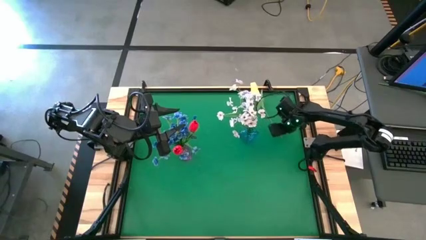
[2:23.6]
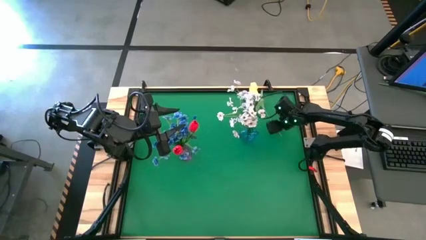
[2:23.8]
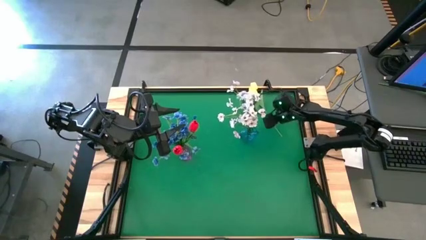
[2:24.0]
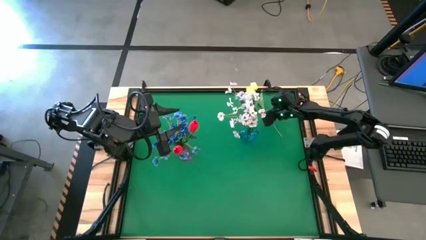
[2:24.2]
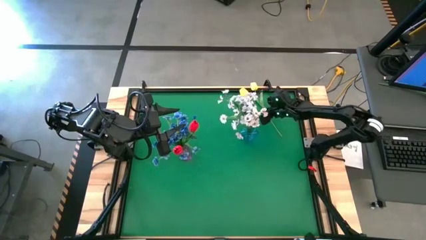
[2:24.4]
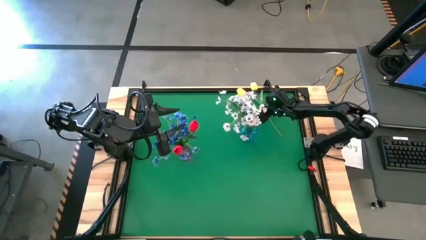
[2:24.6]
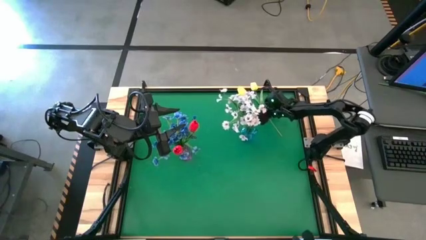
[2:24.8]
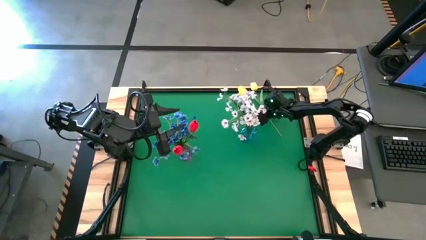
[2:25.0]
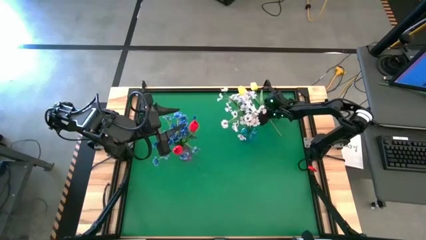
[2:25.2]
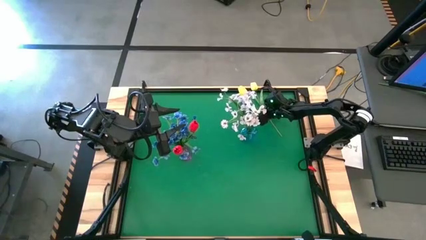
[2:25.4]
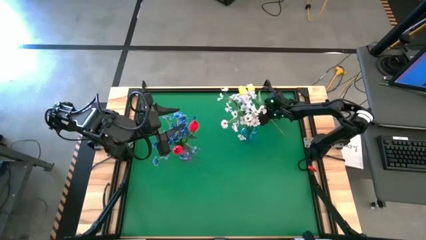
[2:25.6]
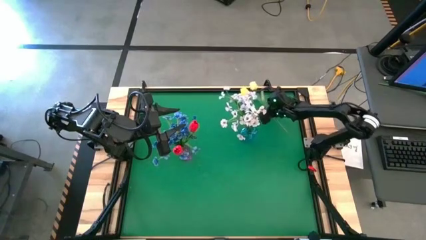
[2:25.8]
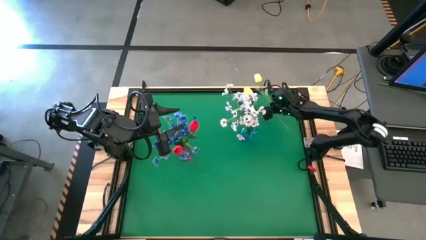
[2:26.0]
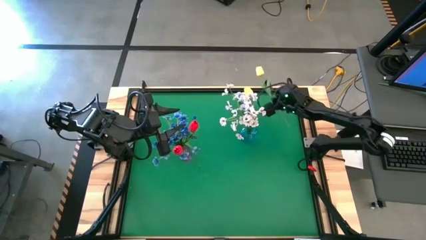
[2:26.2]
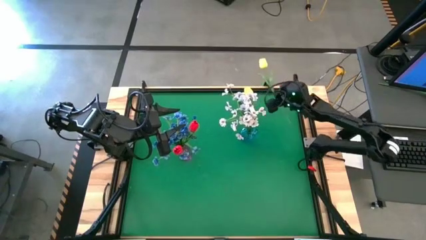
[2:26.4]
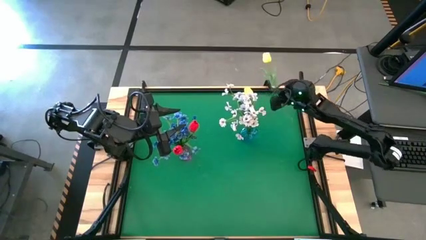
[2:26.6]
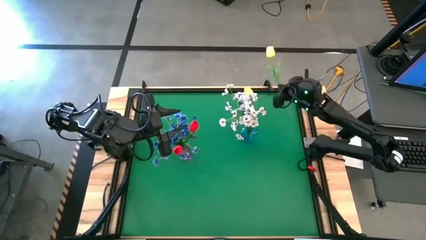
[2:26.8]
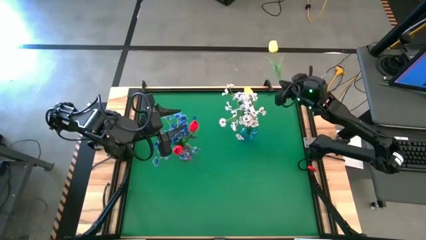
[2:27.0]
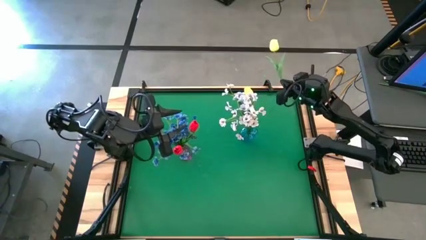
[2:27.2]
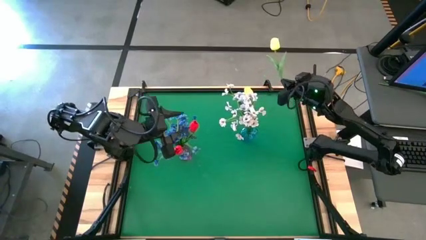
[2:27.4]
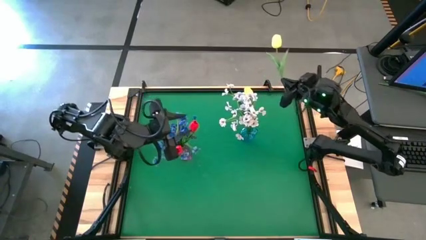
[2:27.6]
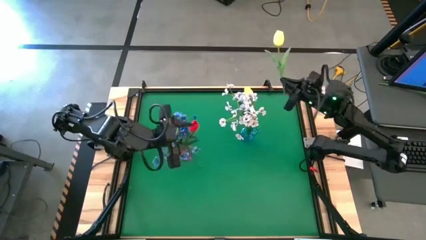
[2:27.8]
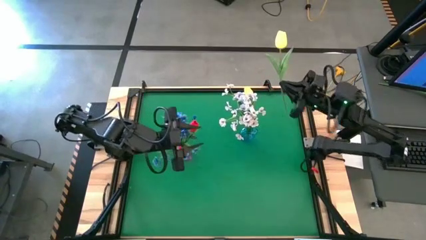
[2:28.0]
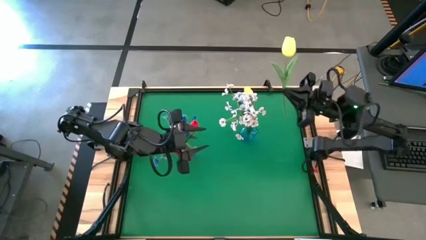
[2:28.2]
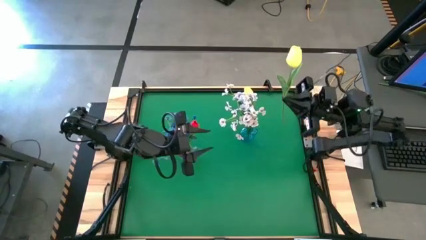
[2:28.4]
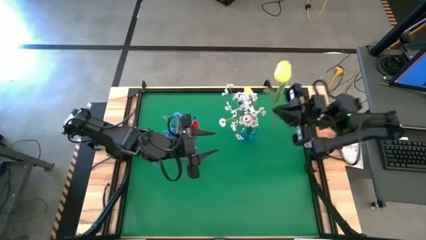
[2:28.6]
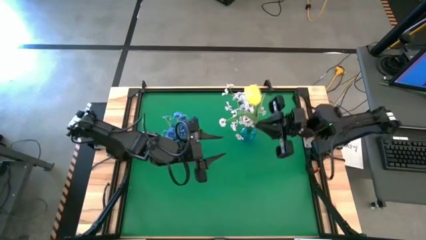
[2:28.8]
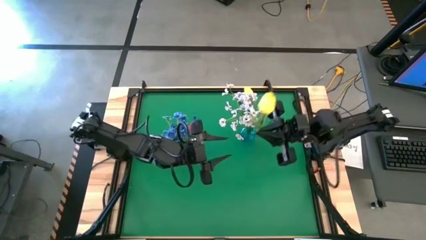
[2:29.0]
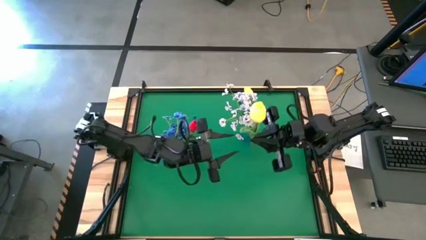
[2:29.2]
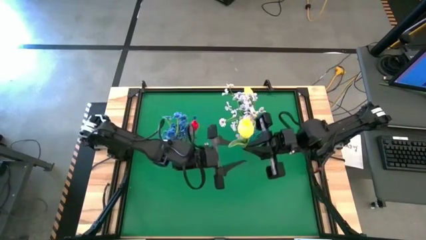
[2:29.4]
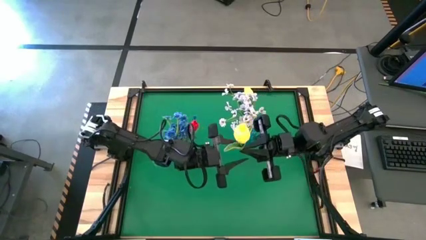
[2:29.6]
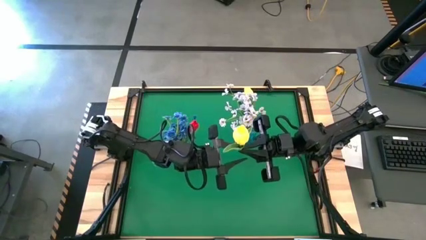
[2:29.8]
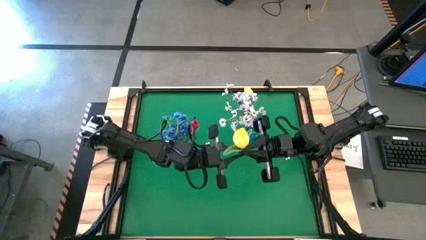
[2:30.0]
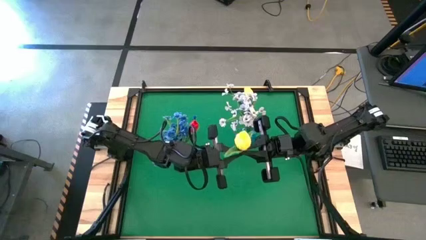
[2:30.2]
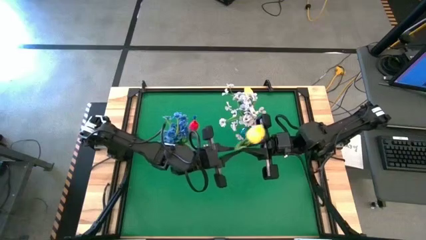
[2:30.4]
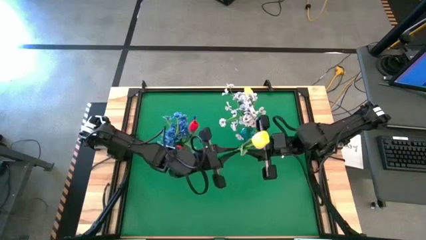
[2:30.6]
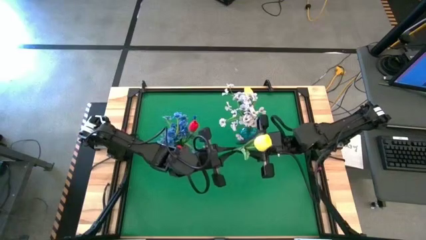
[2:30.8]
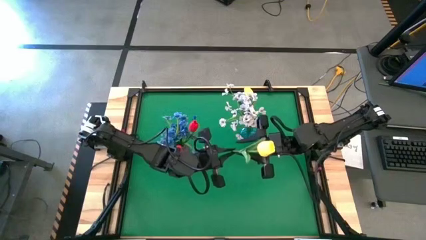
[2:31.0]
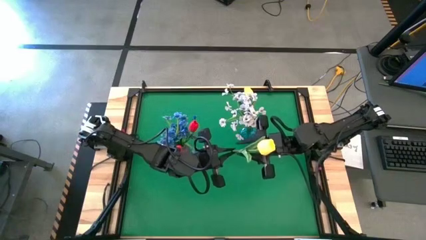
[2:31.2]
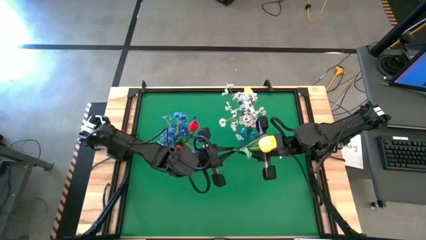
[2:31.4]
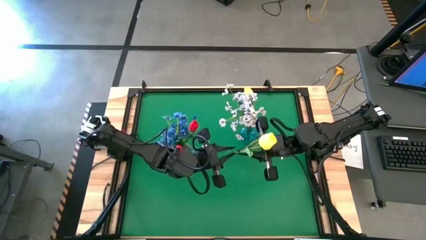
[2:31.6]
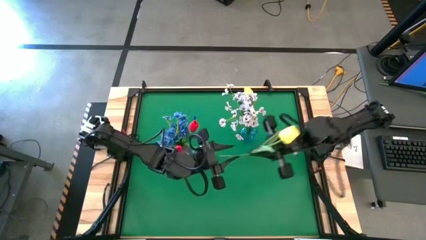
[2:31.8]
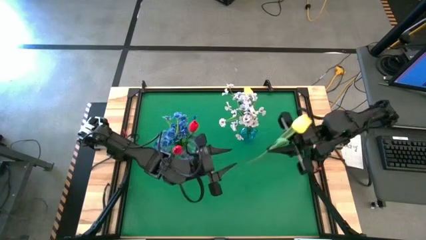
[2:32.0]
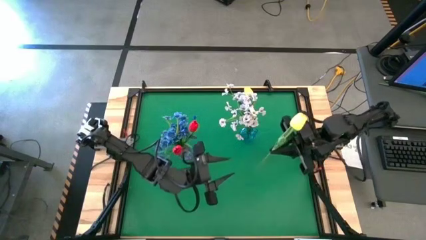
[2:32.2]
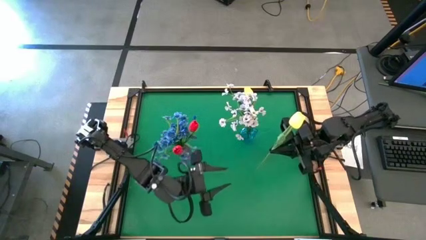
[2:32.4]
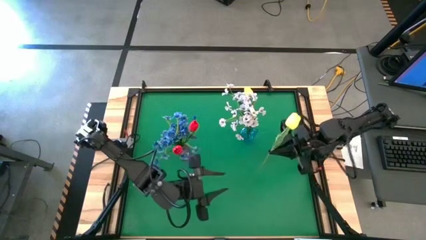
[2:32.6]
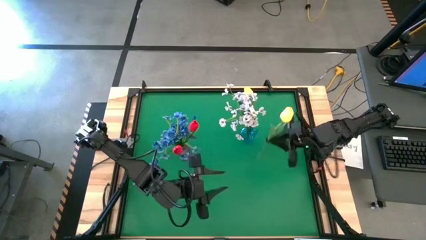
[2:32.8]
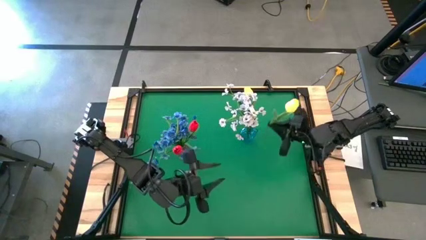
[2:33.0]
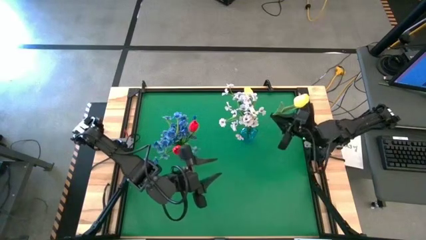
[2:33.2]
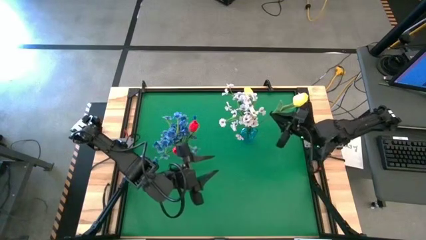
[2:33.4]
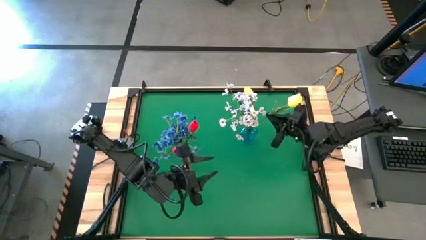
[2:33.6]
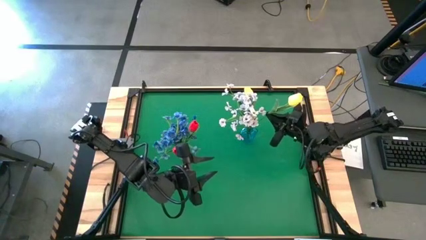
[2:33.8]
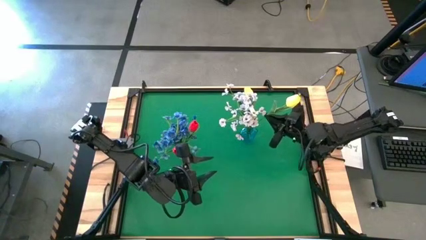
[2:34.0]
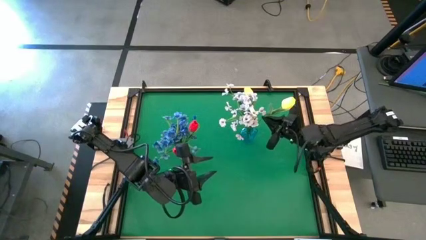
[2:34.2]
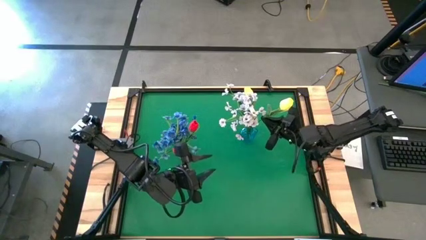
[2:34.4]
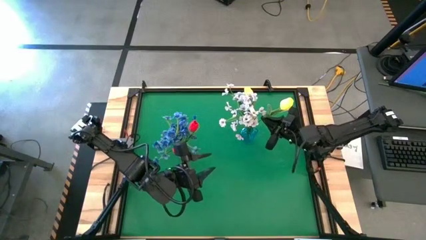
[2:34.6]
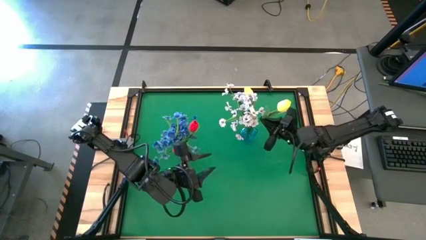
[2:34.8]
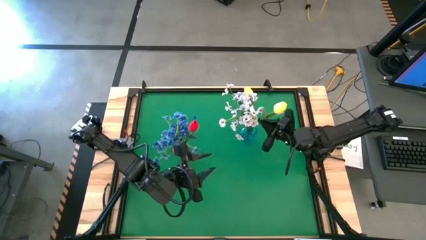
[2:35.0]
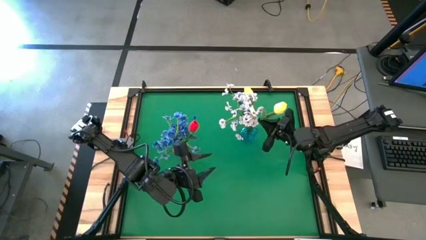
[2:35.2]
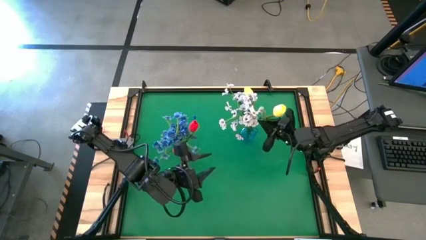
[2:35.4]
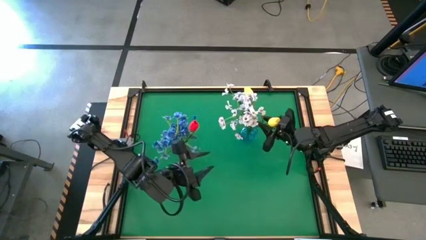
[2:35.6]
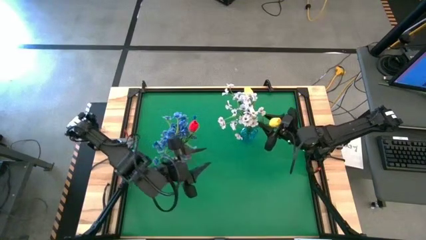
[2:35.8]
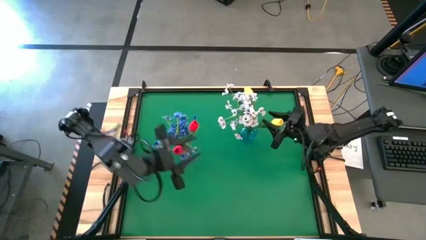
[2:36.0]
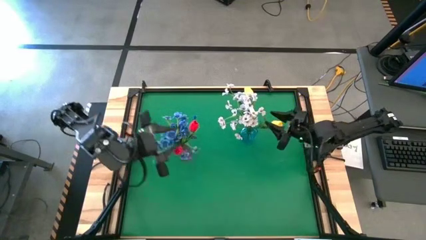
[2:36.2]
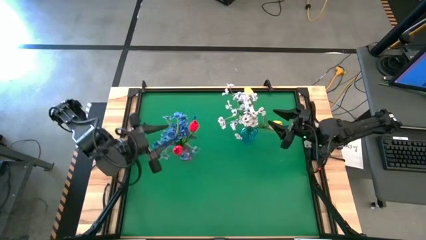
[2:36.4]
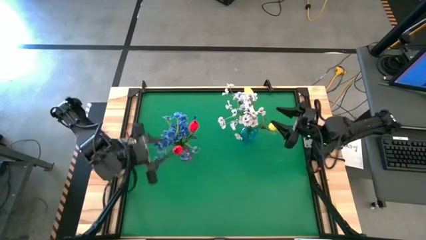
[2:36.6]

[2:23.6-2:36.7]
Task: Sort flowers into vase by color
Put the yellow tulip into the blue vase
